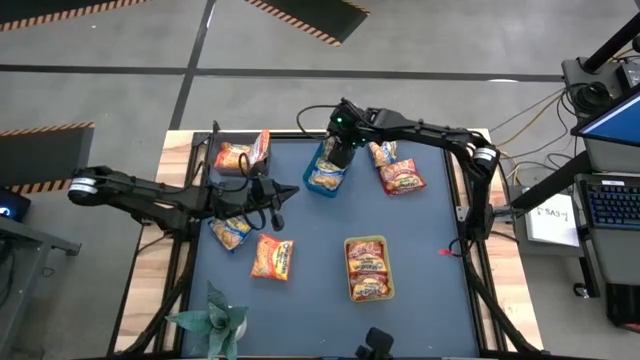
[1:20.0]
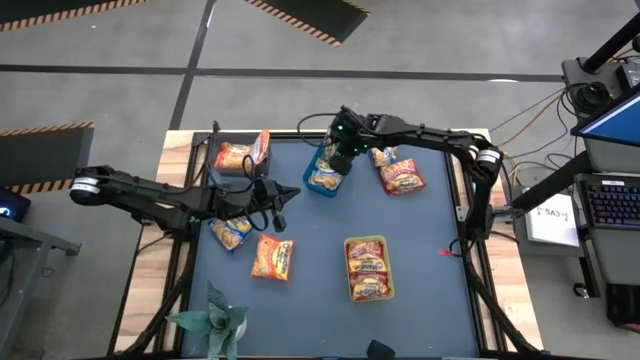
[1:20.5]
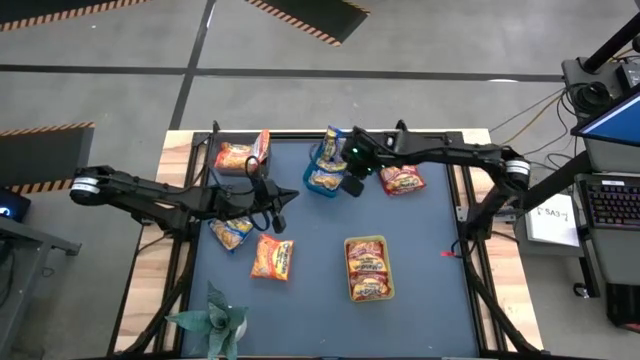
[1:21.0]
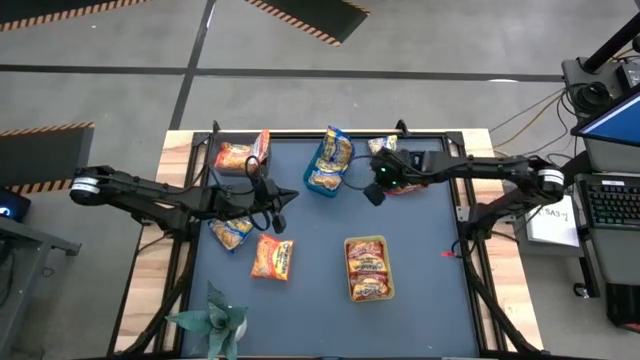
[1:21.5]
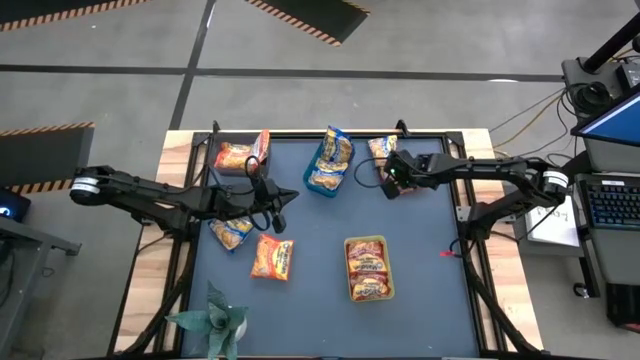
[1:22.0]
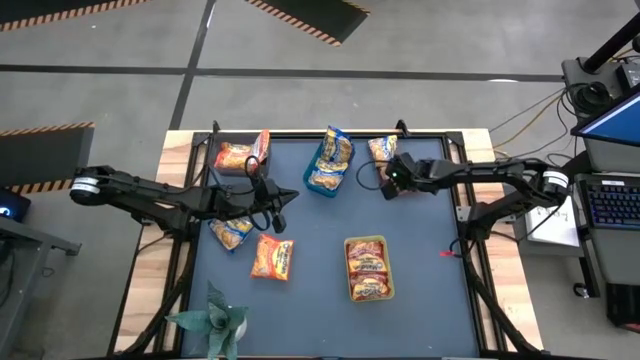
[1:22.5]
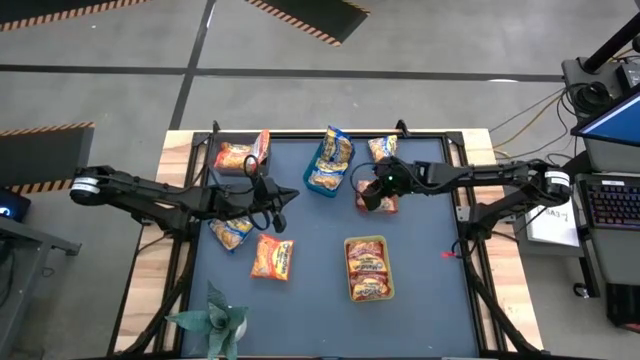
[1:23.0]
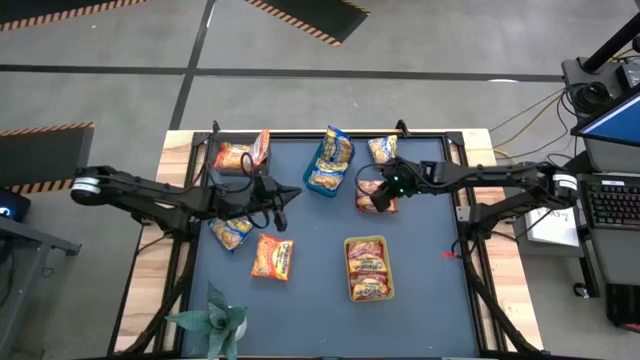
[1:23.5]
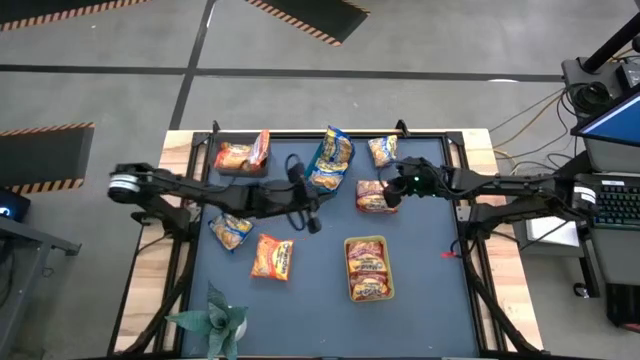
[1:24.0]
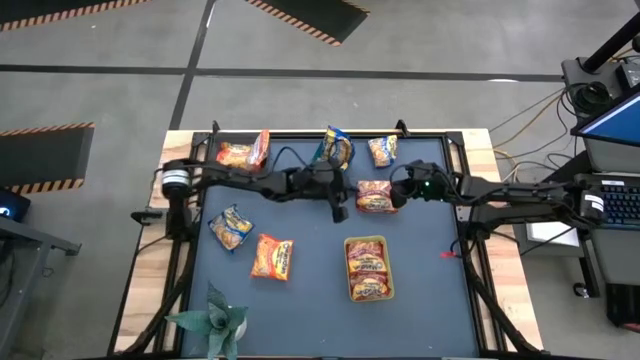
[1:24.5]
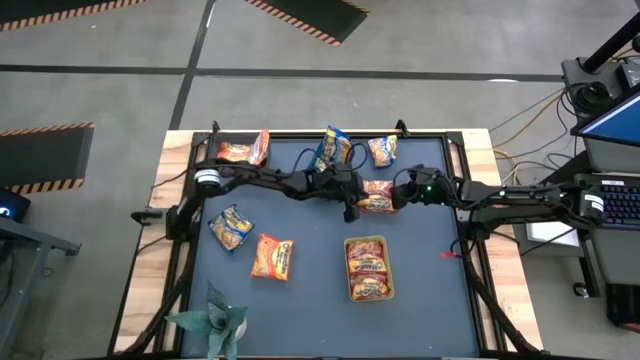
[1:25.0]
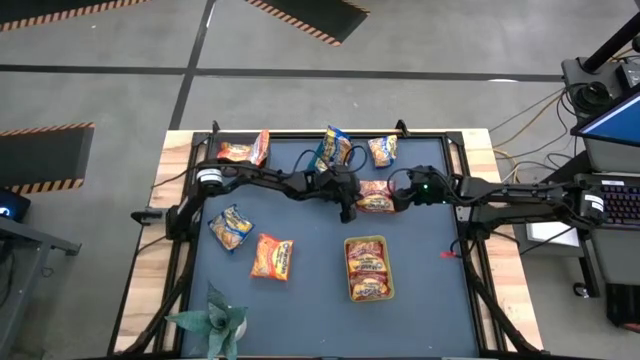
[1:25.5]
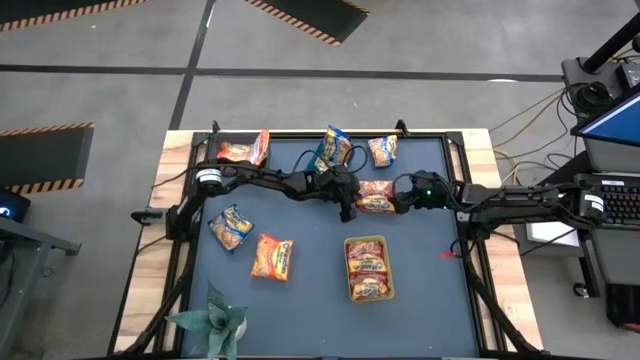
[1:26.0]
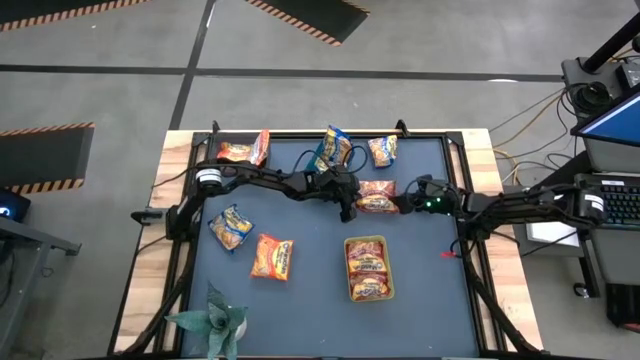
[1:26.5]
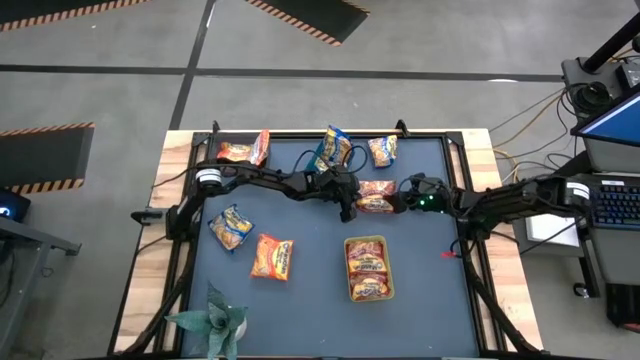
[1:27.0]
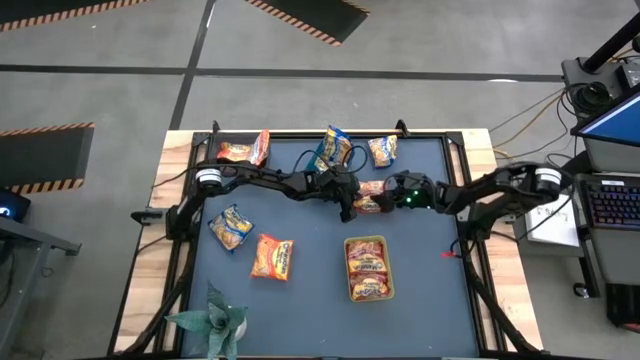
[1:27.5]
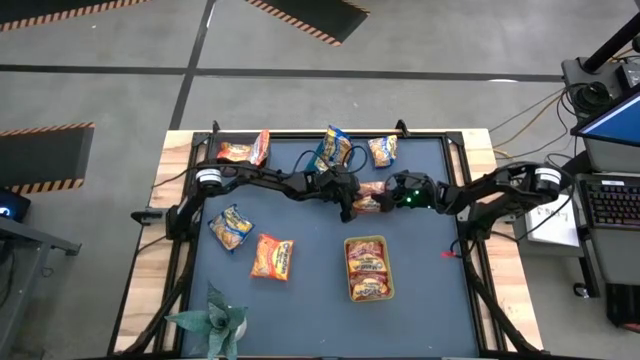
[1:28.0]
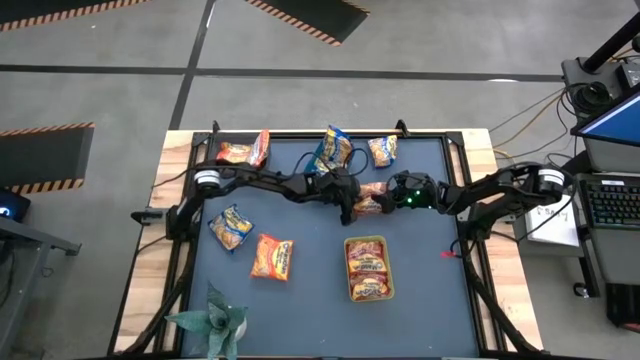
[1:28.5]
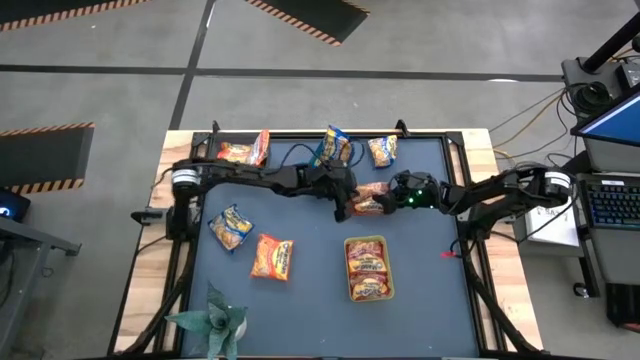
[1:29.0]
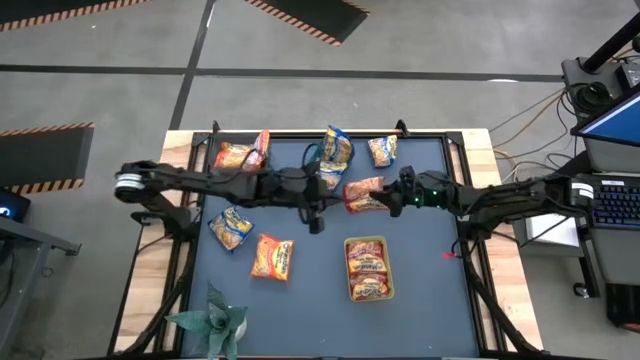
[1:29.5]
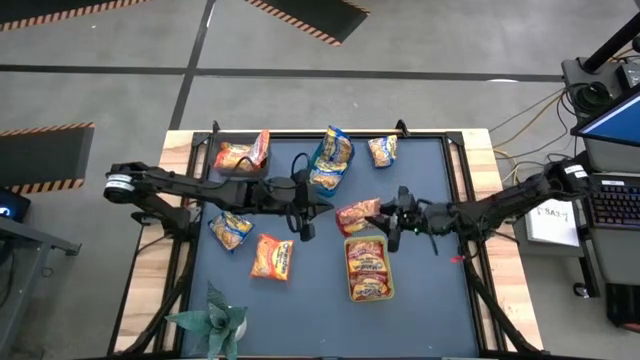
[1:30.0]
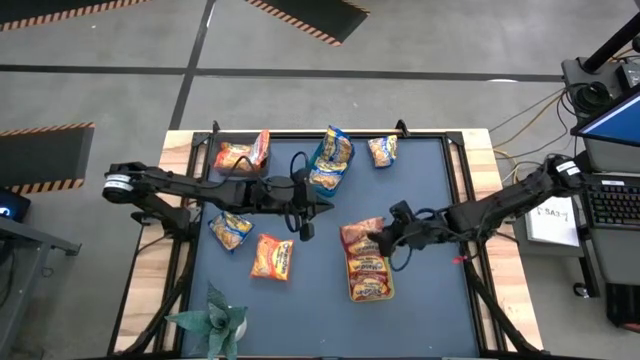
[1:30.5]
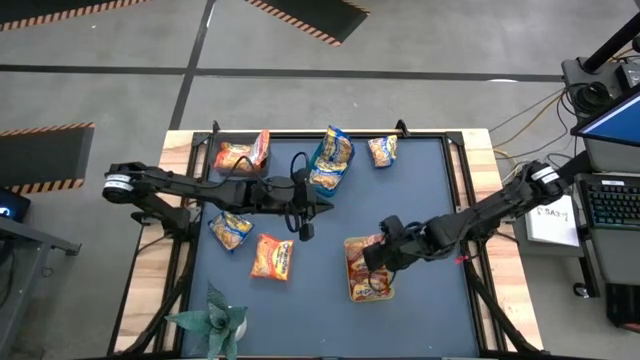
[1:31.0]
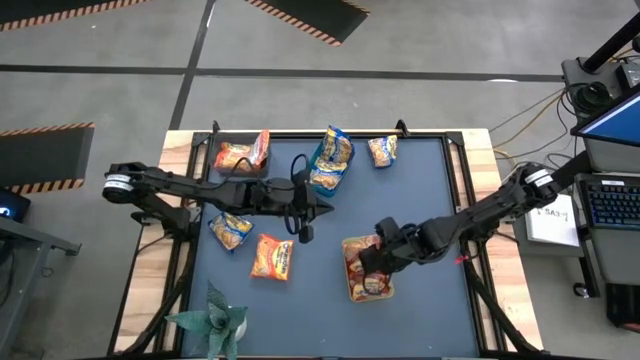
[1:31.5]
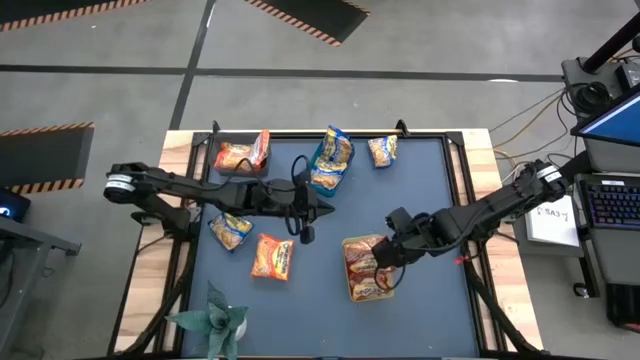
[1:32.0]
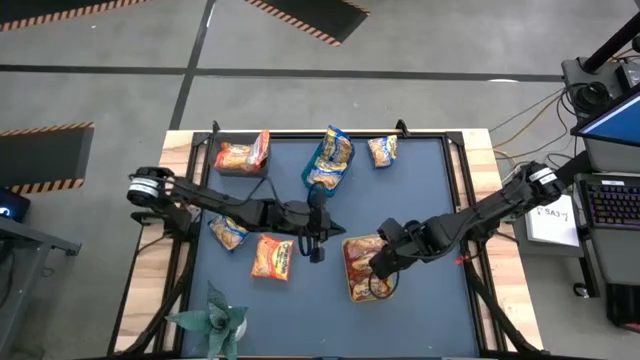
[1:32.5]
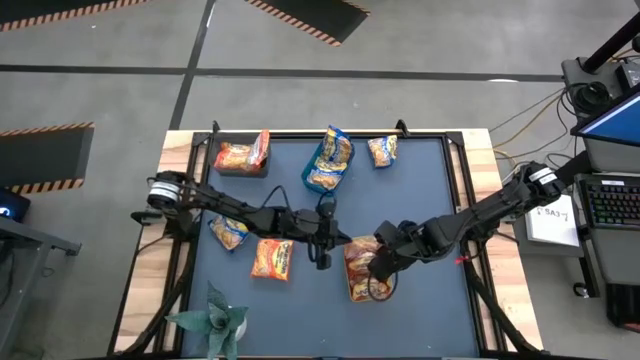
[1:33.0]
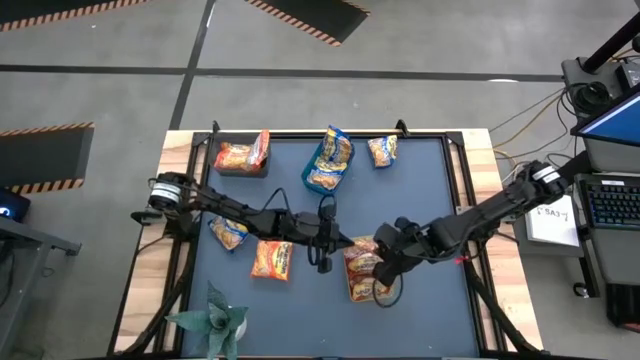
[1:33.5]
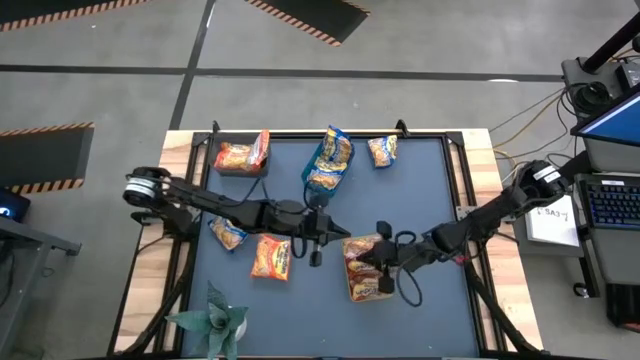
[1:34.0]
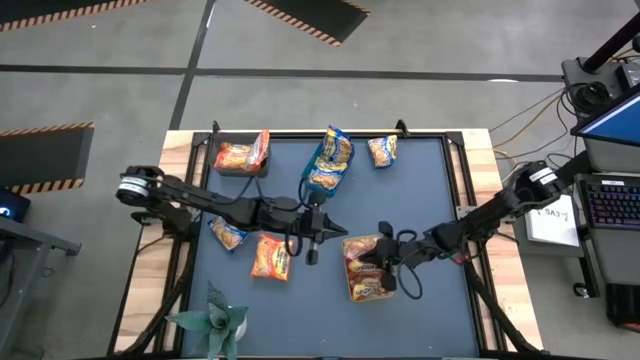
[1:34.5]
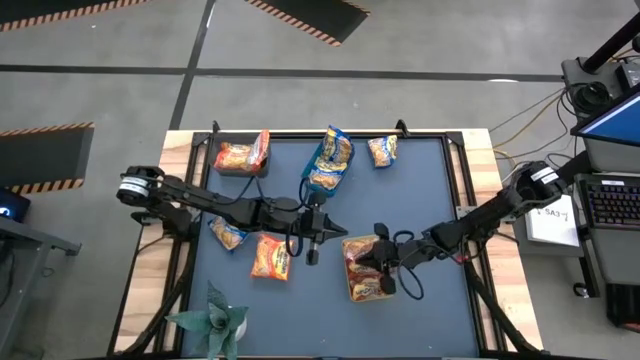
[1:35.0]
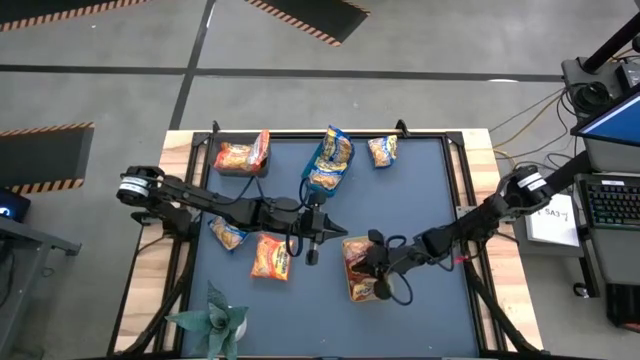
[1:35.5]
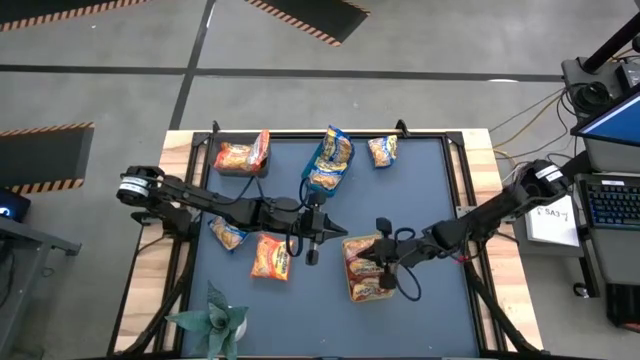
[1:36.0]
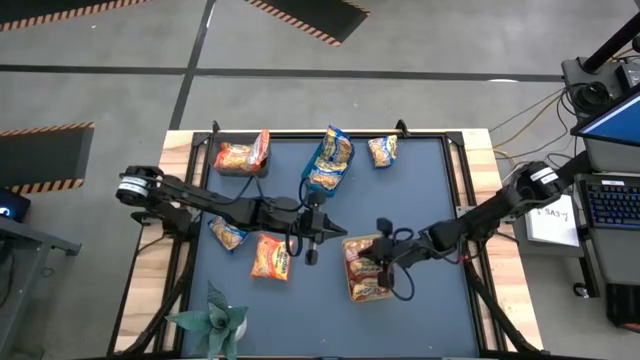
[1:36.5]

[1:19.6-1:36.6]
Task: Sort Maruchan noodles
Put the red noodle pack into the yellow bin

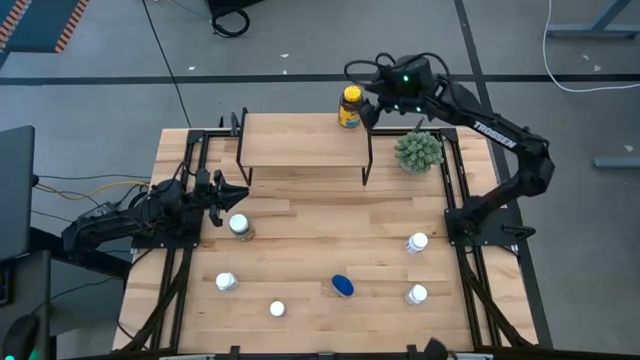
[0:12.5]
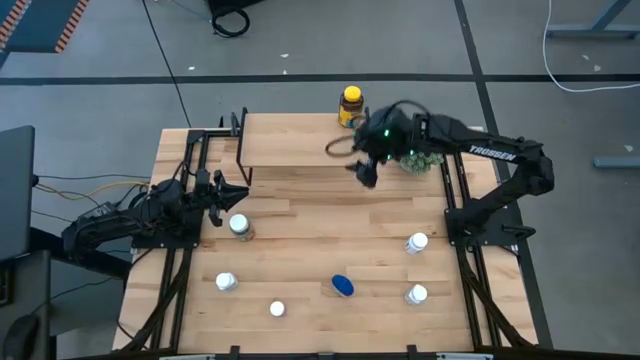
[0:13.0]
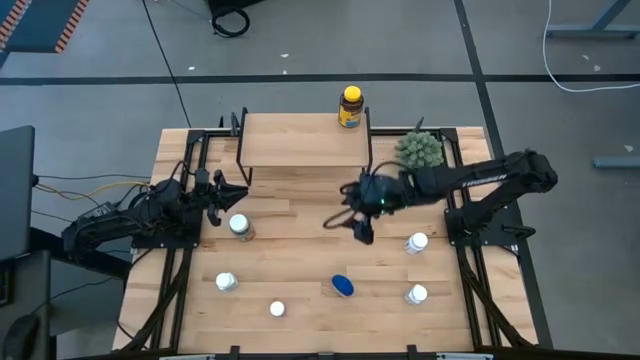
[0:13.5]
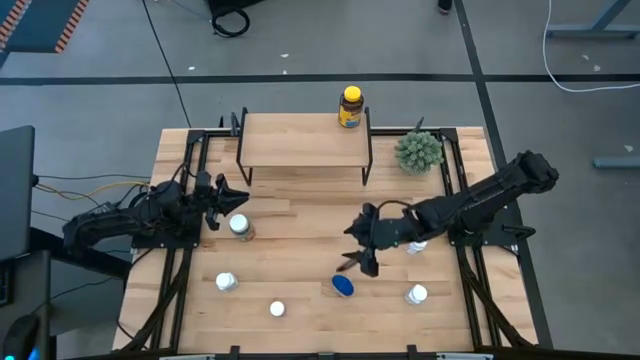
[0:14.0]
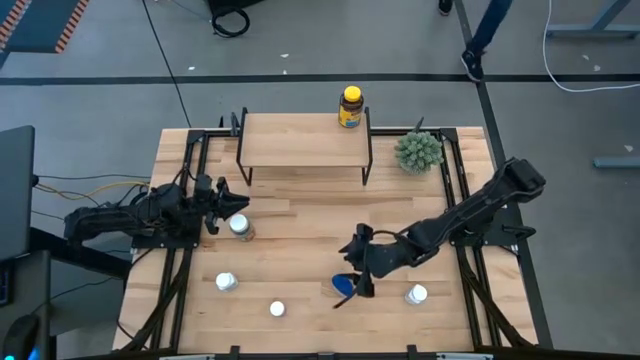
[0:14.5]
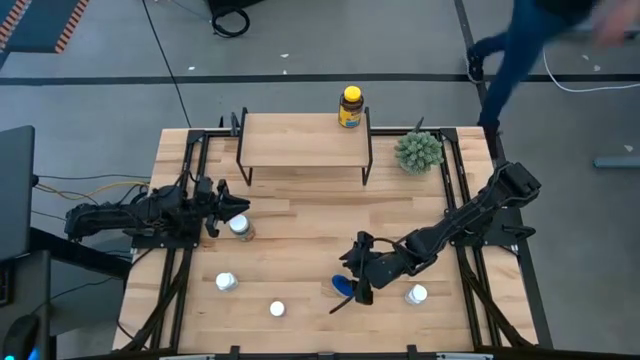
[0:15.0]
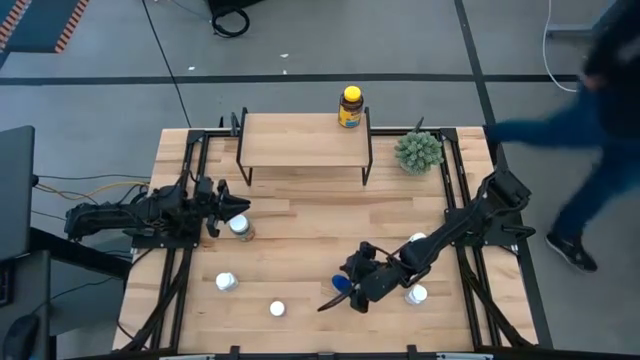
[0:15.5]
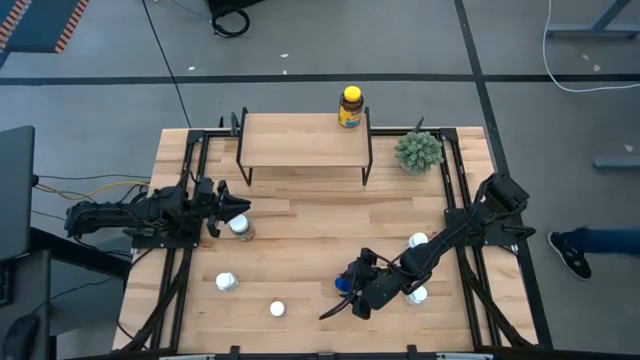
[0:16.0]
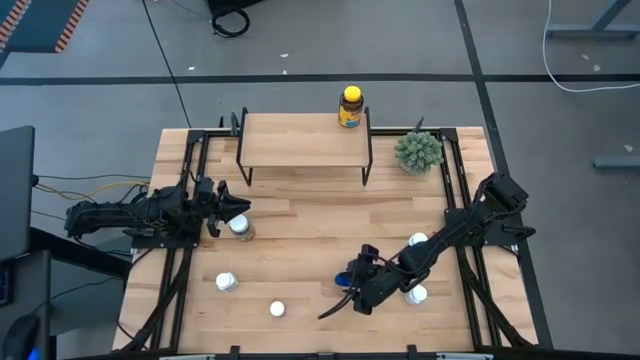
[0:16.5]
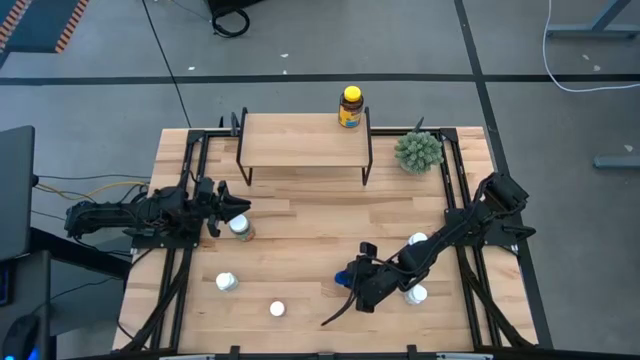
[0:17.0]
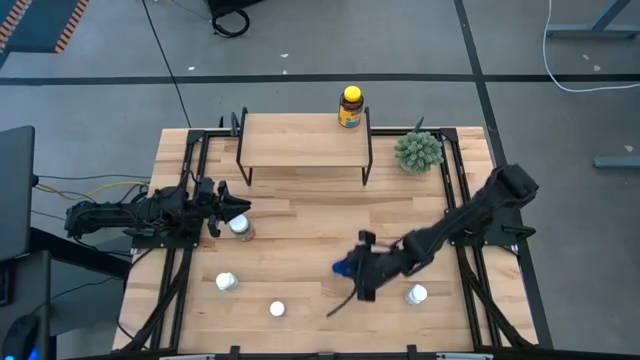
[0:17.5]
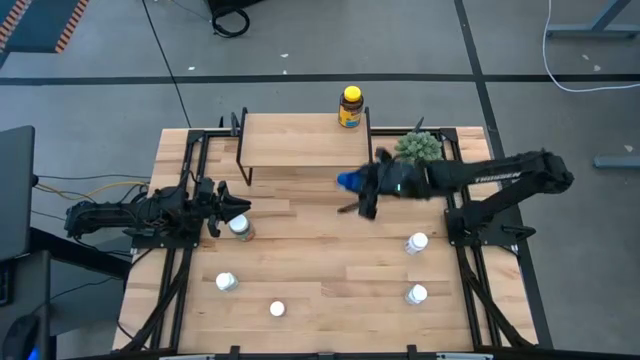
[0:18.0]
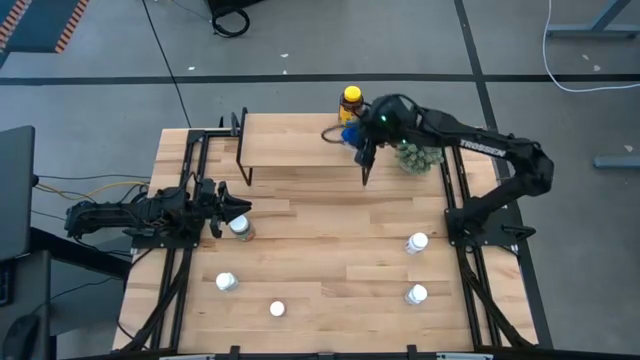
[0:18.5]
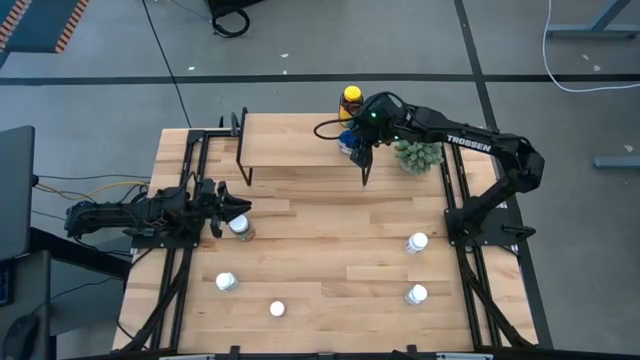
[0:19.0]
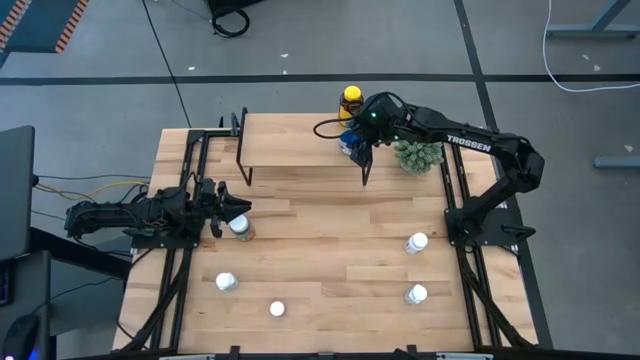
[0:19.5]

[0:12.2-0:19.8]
Task: Pick and place medicine bottles onto shelf by color
Put the blue pill bottle on the shelf
